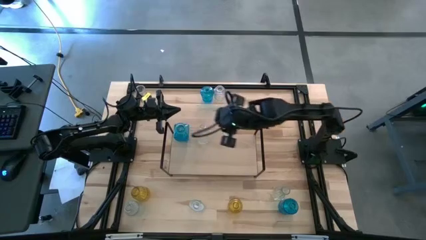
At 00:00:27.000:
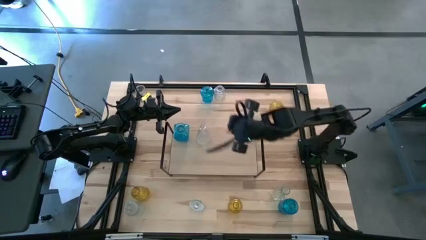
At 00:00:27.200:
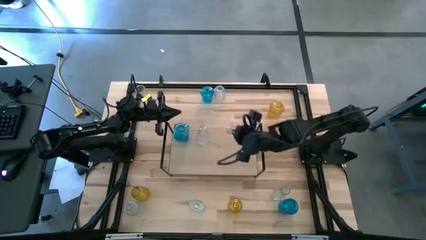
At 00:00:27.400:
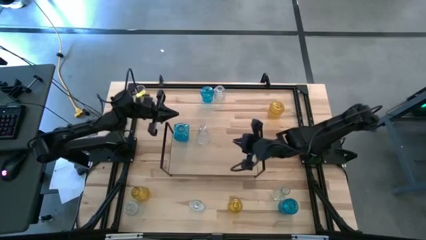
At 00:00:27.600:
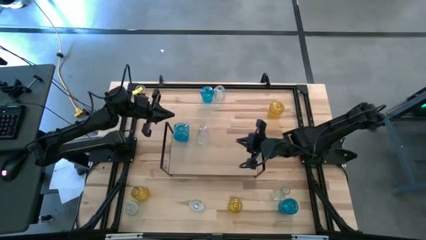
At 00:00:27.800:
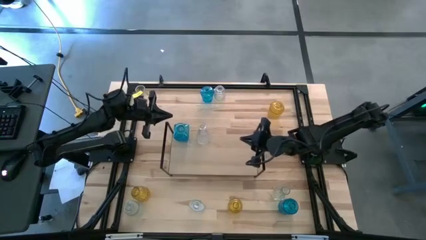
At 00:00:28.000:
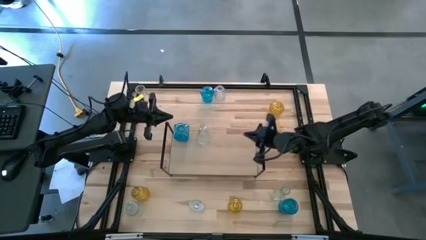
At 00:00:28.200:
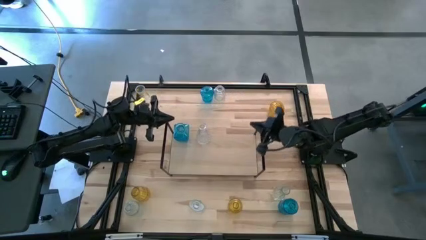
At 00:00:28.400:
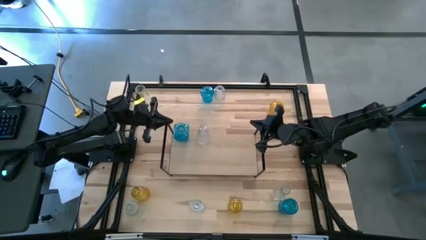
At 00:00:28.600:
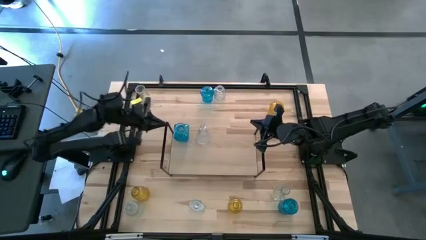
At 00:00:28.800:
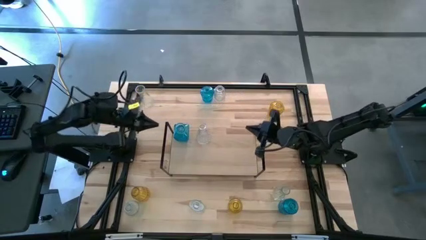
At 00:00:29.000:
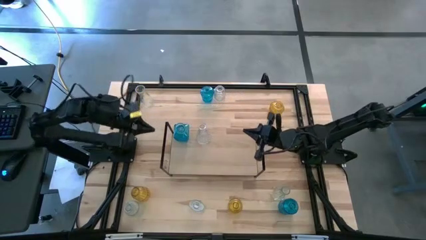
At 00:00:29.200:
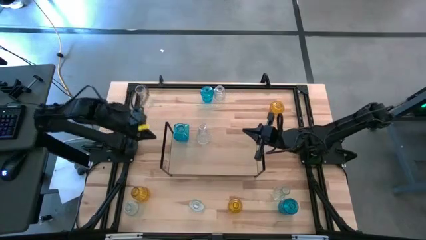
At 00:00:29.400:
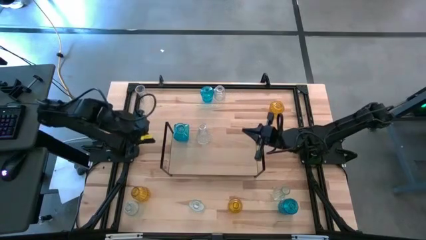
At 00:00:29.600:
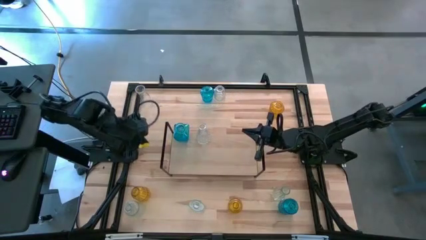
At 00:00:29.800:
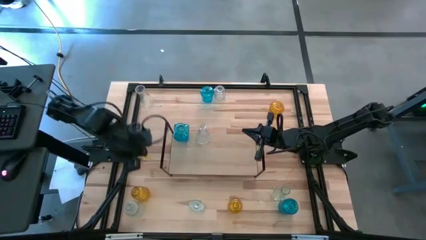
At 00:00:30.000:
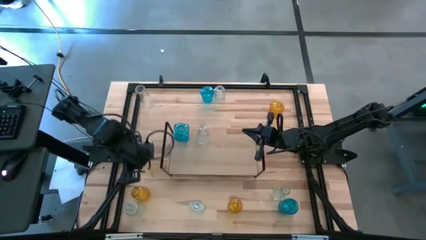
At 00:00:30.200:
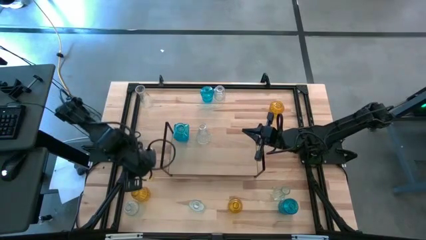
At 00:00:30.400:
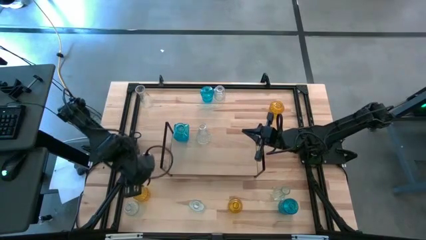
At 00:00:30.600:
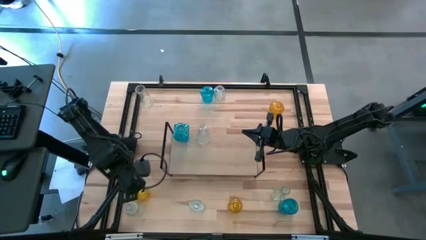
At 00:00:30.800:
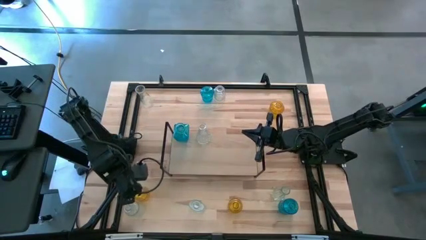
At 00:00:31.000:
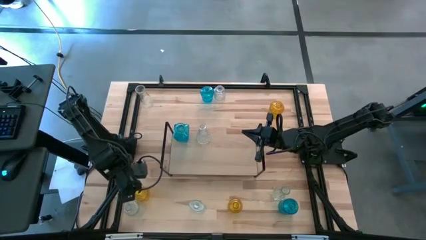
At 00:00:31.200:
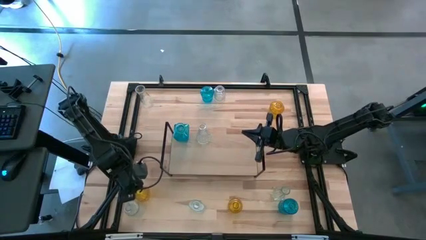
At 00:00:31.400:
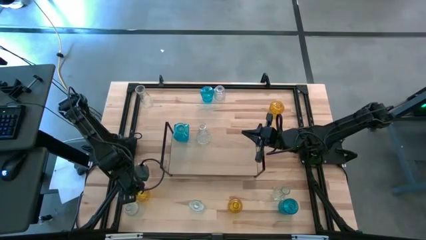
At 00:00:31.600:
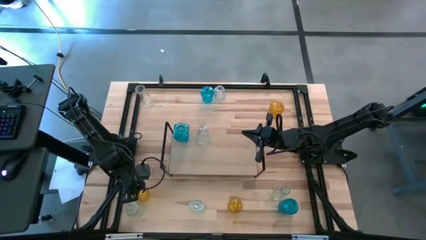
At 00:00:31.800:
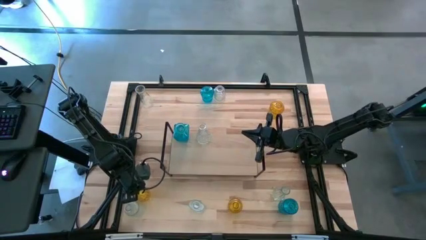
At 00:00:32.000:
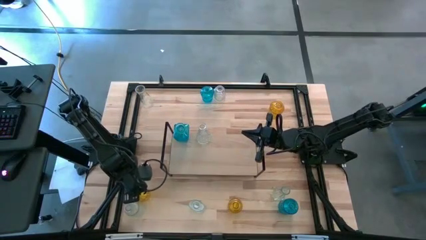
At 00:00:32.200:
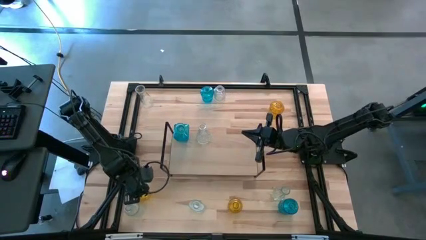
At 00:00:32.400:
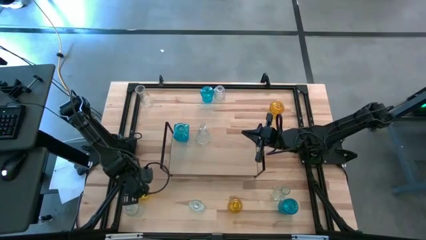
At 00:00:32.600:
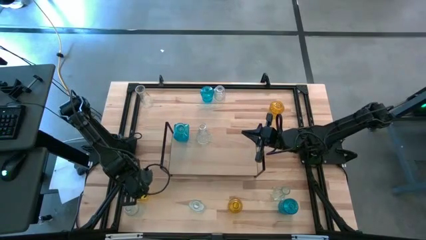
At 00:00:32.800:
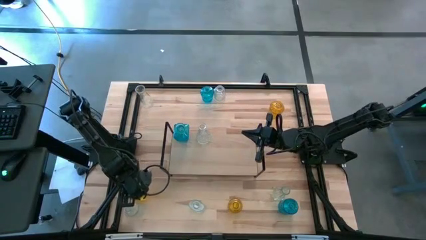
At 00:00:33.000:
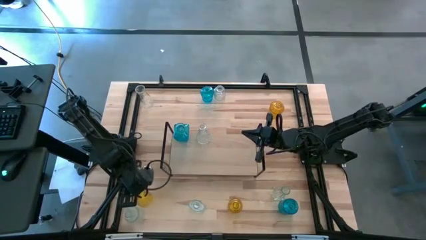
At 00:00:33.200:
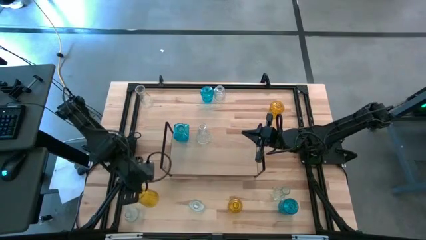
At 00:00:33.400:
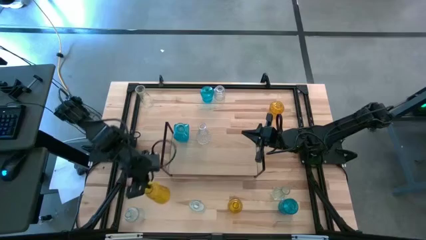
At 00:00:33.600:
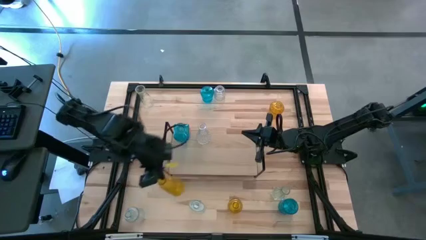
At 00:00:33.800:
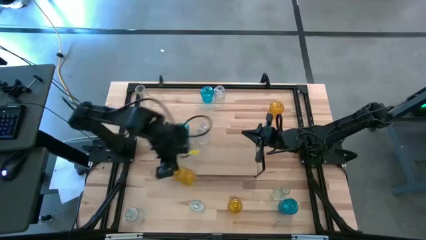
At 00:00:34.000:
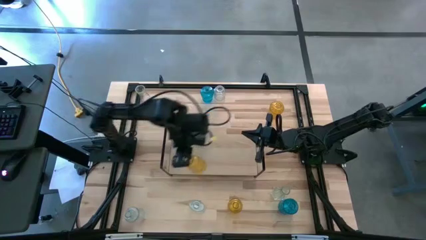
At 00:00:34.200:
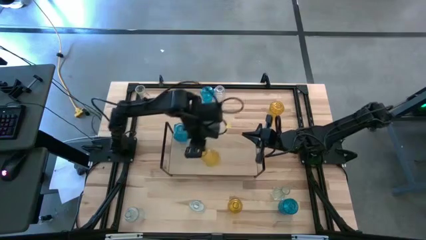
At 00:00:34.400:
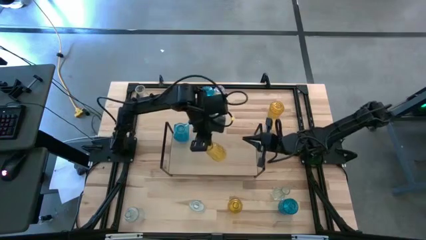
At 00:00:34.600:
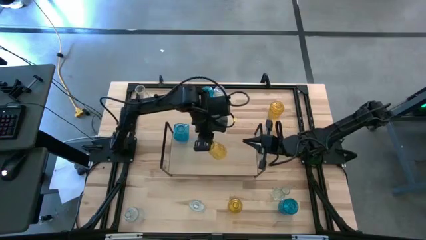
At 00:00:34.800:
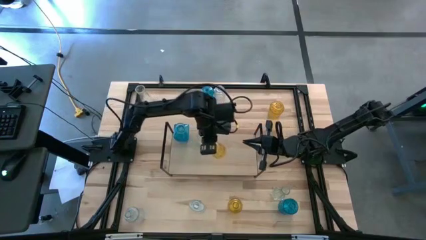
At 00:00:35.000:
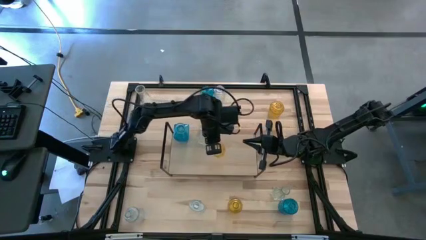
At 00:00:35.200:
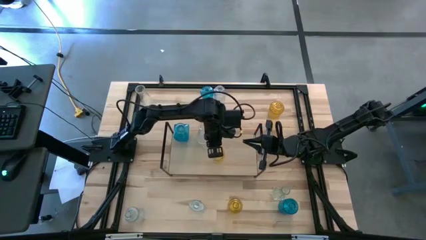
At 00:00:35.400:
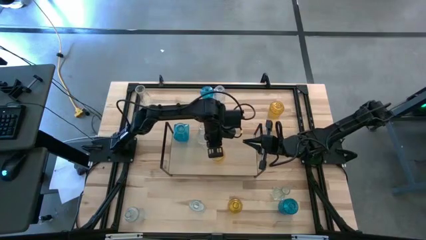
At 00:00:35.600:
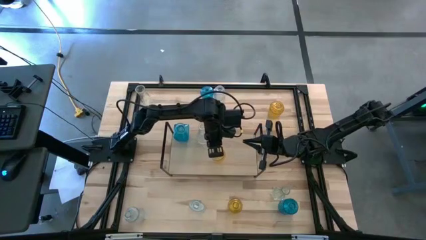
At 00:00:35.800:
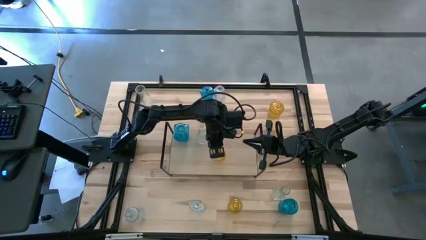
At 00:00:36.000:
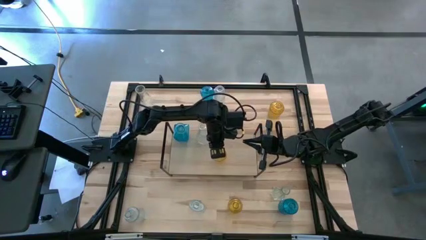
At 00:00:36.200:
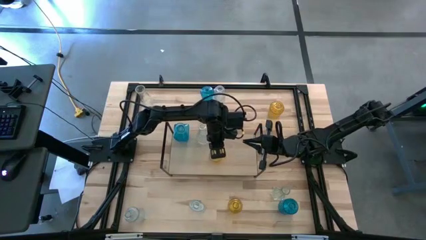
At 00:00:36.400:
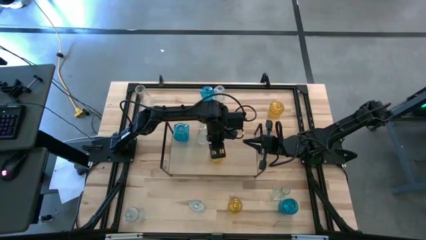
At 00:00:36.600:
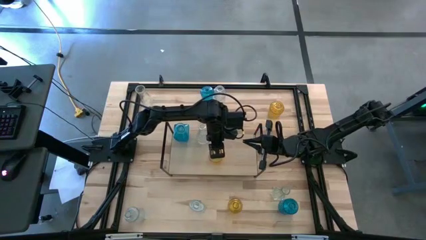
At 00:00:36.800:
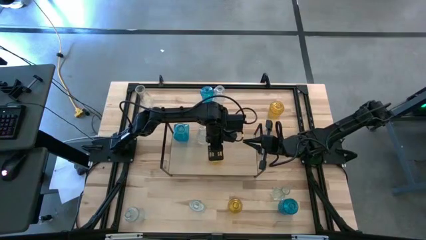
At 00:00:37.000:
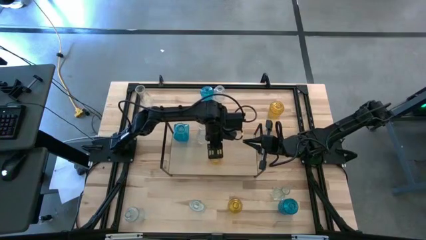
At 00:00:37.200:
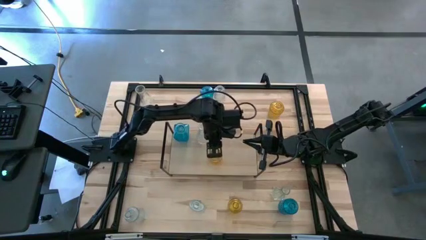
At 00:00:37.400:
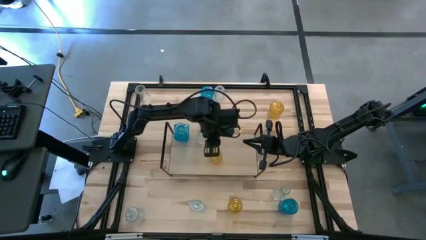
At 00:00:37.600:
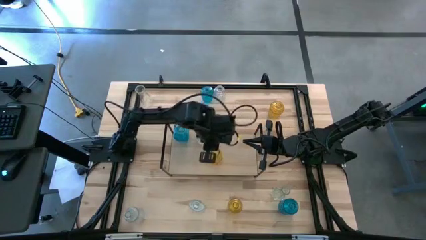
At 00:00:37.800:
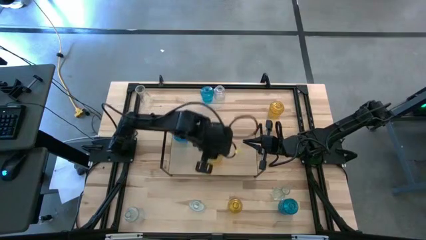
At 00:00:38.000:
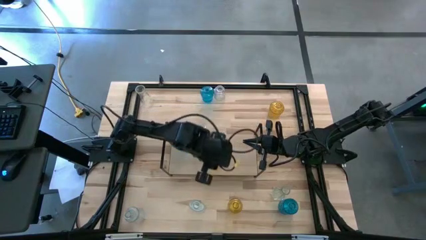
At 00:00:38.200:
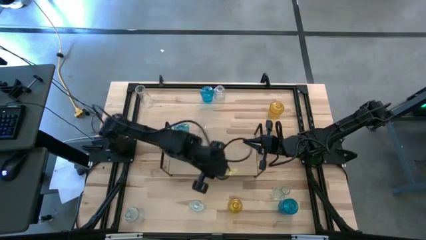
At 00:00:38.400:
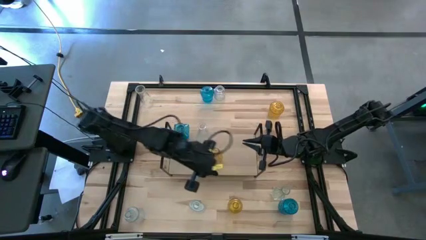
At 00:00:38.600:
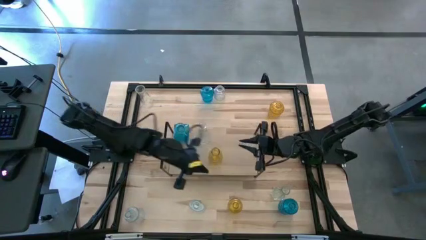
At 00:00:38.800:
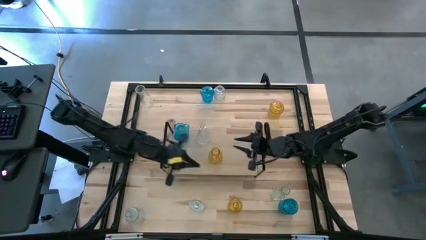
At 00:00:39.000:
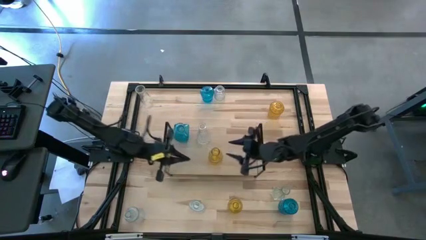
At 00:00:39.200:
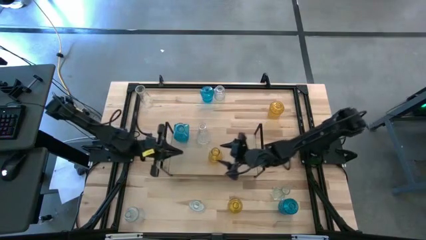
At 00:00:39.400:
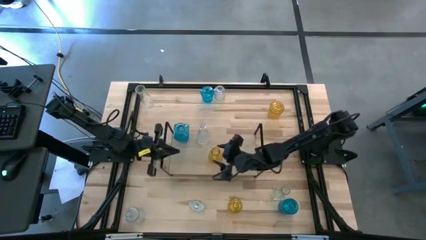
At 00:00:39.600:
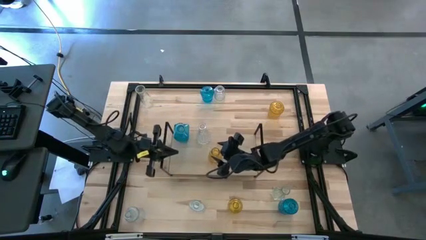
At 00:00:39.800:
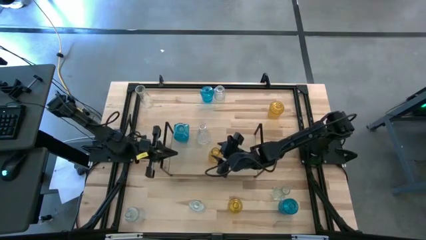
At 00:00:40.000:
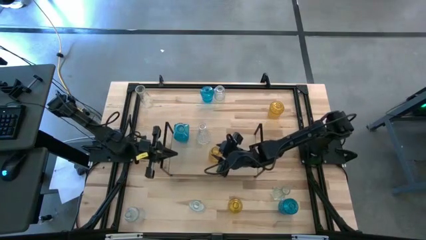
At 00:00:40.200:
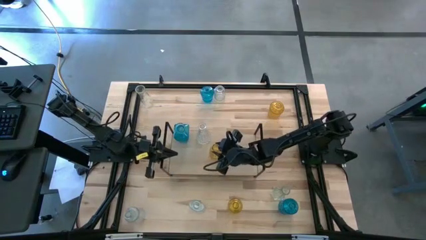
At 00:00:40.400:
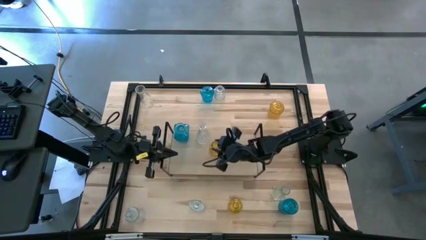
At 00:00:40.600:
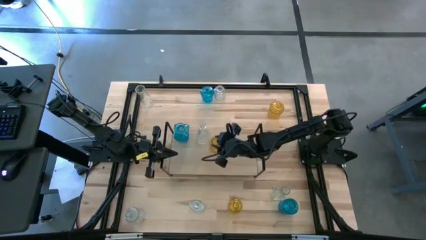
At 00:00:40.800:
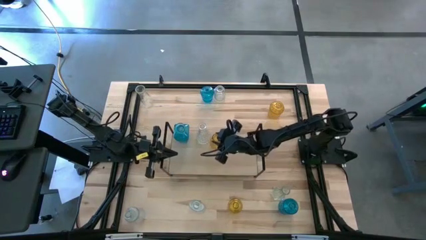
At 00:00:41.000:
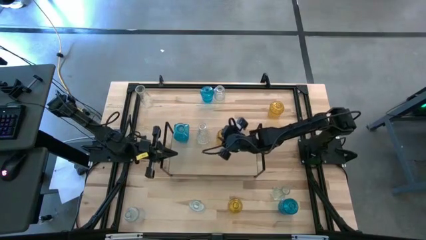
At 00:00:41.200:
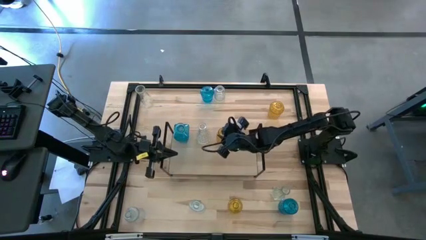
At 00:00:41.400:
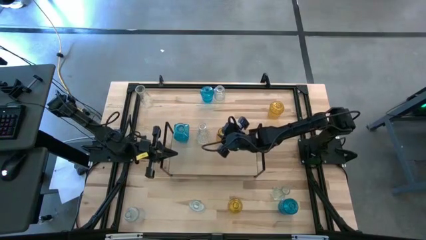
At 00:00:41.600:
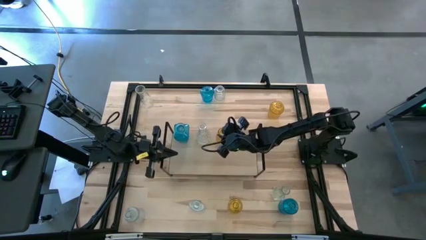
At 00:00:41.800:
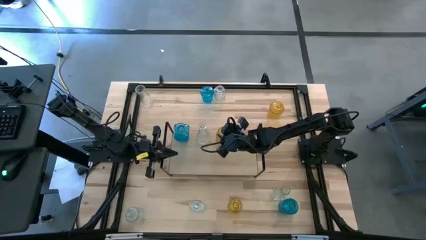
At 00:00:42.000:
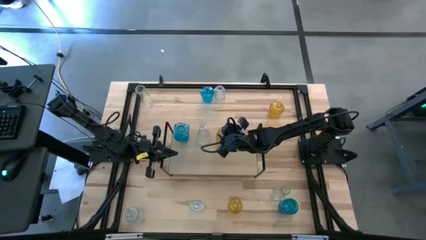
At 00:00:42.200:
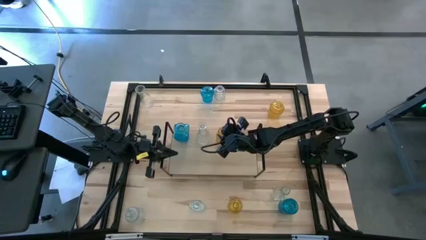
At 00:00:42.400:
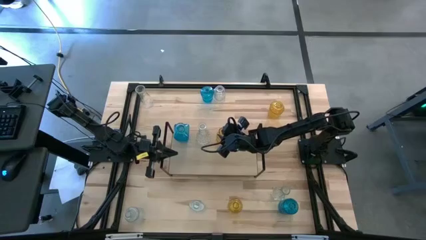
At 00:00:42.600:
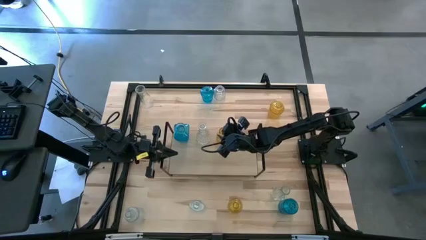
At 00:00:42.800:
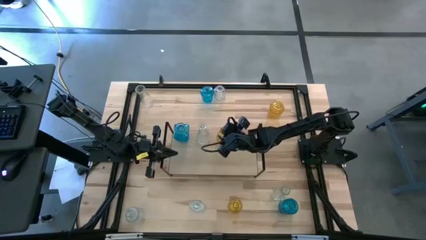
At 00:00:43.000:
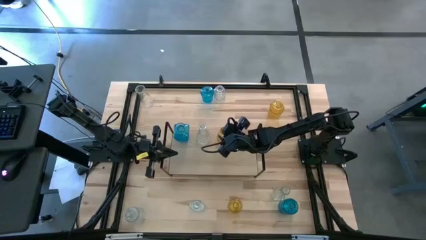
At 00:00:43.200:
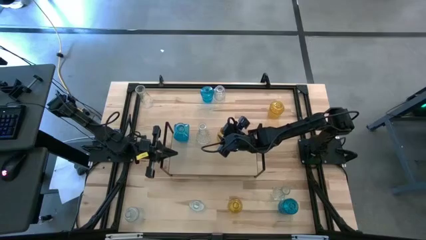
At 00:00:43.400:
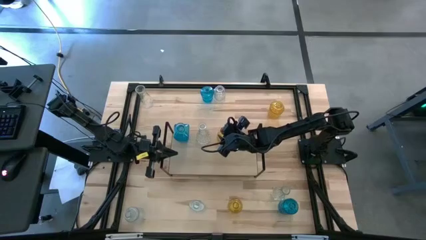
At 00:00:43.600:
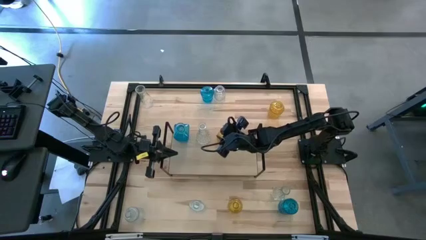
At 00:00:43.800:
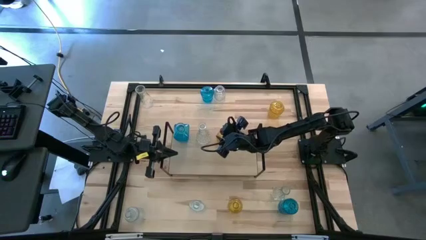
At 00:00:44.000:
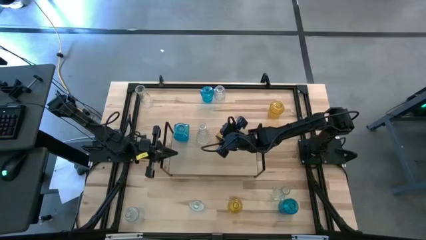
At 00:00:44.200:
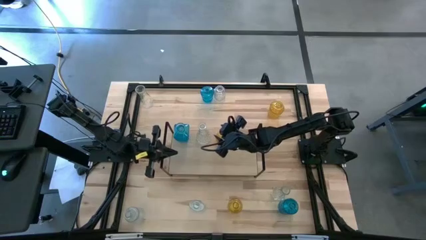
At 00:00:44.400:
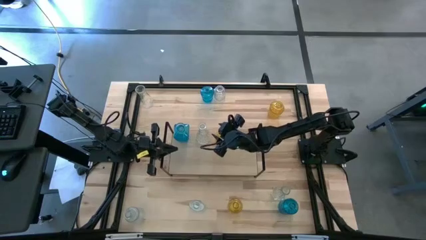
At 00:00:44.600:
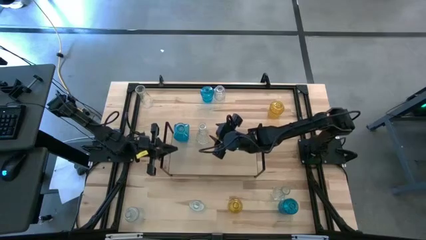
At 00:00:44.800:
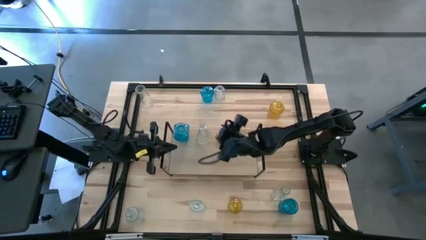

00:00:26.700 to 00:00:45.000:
Task: sort vases onto shelf
Put the bottom left yellow vase on the shelf
